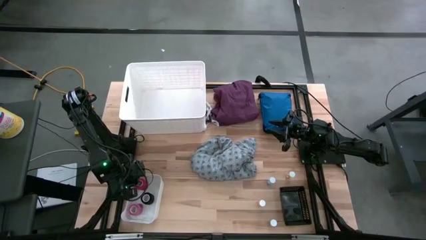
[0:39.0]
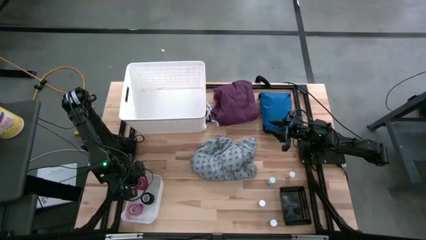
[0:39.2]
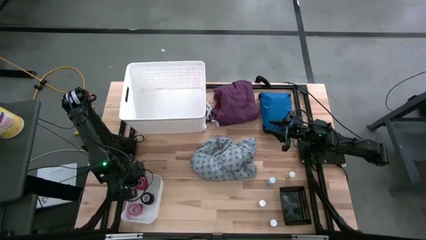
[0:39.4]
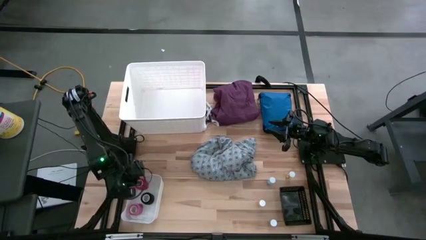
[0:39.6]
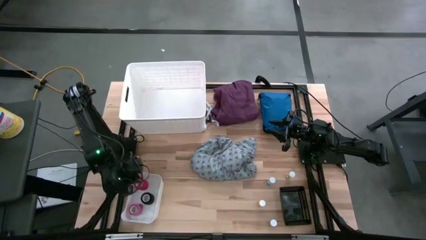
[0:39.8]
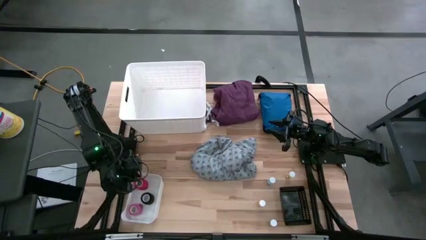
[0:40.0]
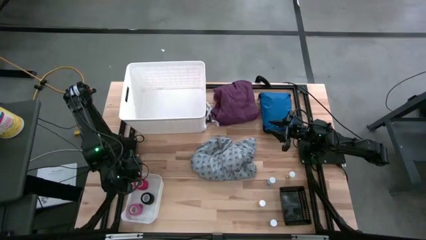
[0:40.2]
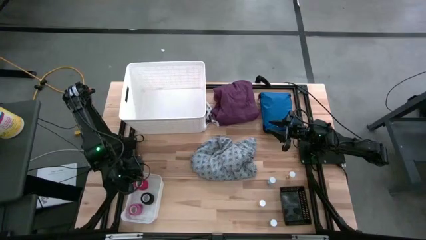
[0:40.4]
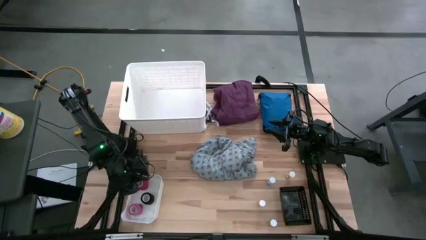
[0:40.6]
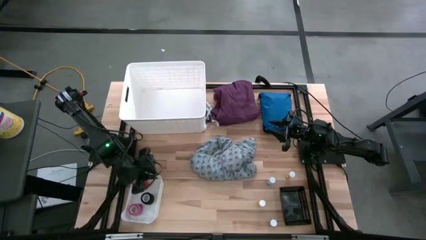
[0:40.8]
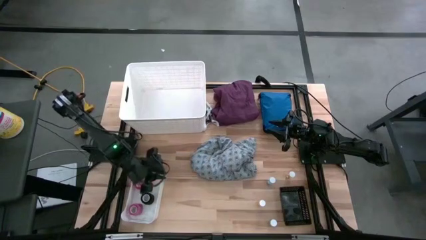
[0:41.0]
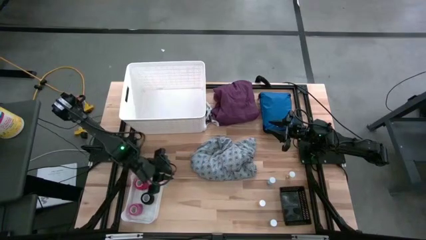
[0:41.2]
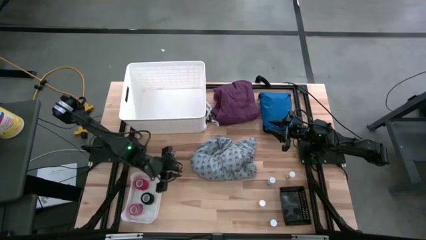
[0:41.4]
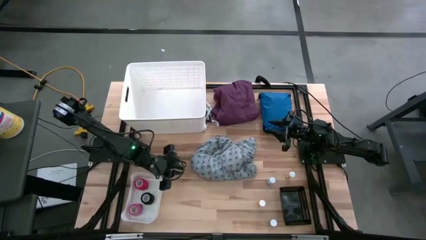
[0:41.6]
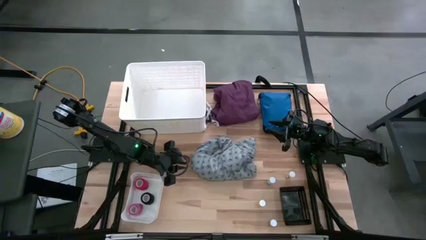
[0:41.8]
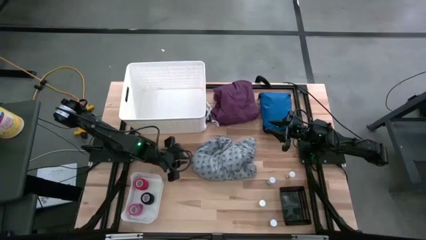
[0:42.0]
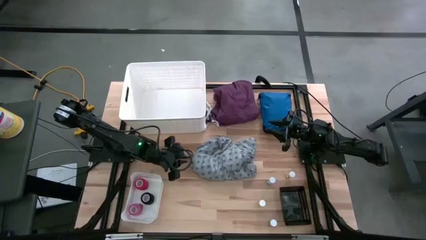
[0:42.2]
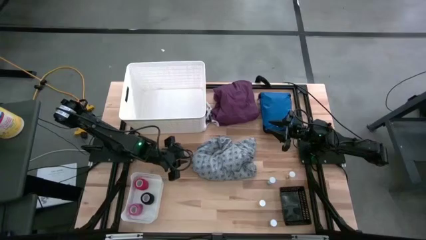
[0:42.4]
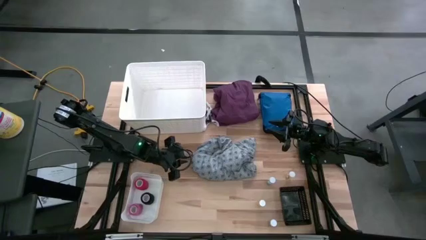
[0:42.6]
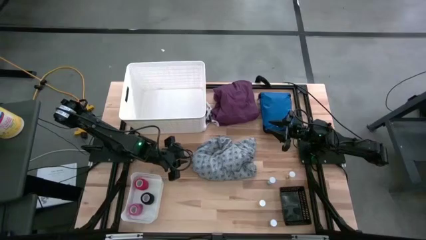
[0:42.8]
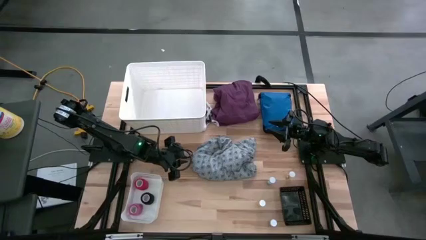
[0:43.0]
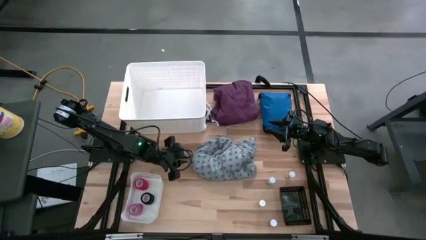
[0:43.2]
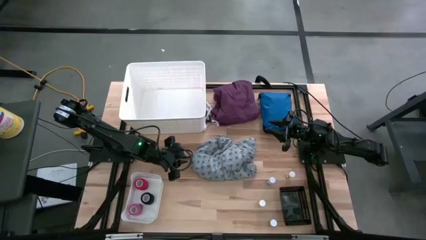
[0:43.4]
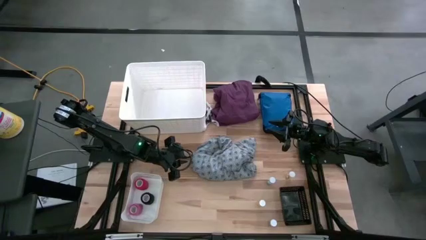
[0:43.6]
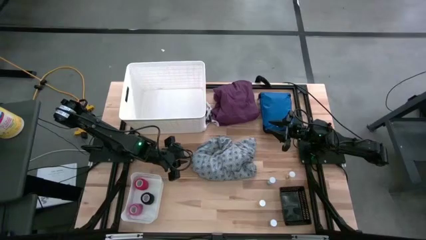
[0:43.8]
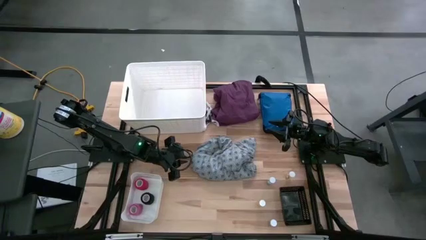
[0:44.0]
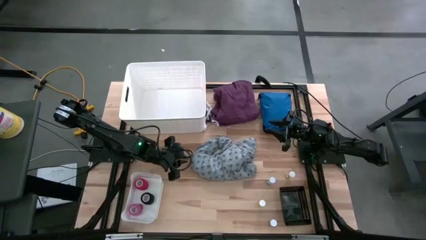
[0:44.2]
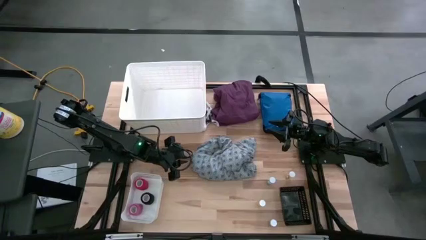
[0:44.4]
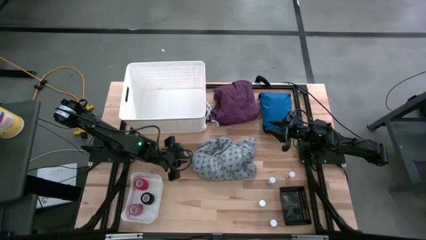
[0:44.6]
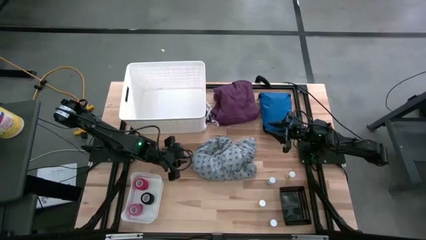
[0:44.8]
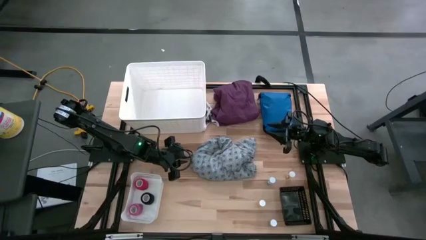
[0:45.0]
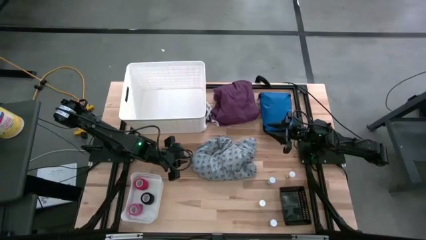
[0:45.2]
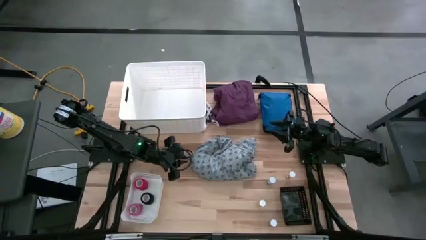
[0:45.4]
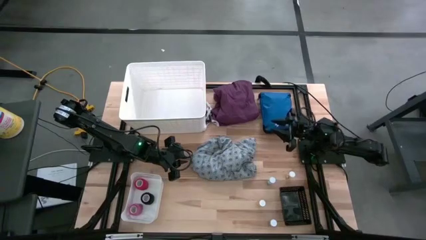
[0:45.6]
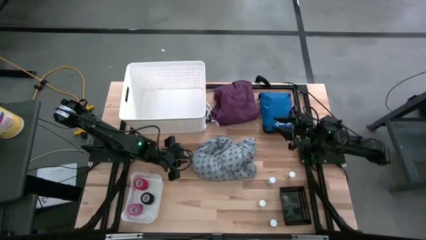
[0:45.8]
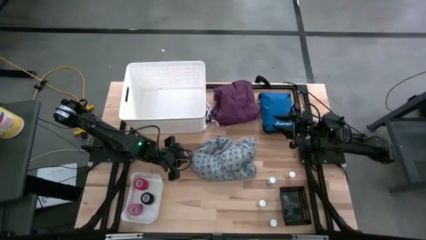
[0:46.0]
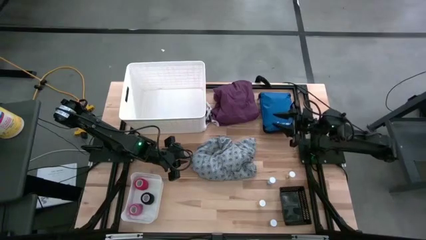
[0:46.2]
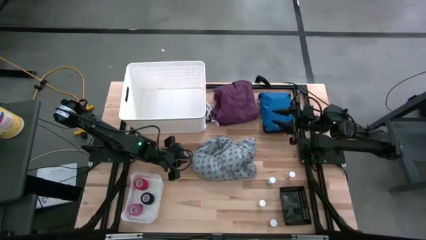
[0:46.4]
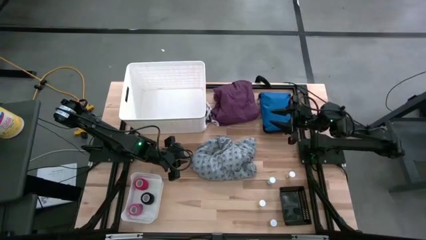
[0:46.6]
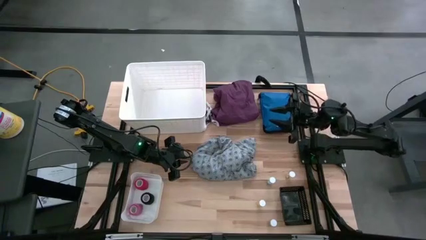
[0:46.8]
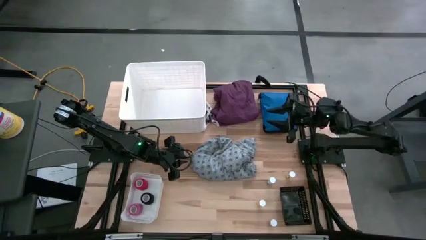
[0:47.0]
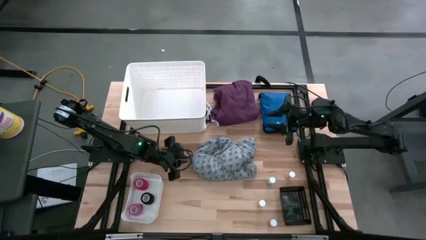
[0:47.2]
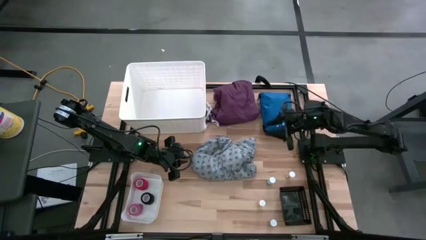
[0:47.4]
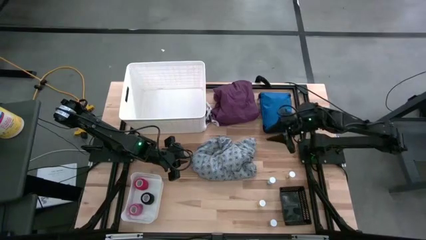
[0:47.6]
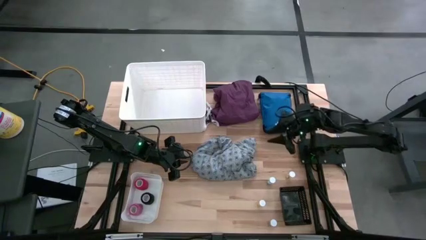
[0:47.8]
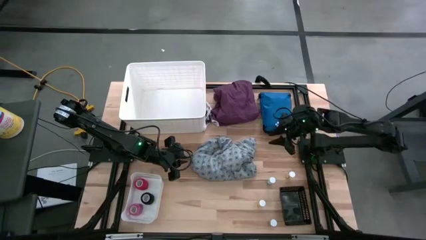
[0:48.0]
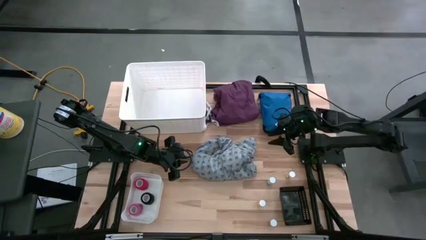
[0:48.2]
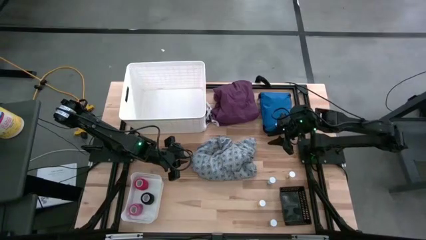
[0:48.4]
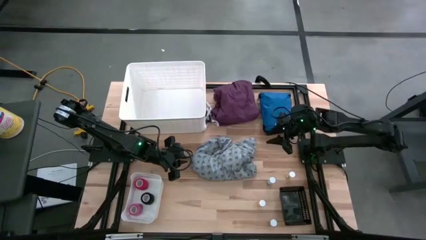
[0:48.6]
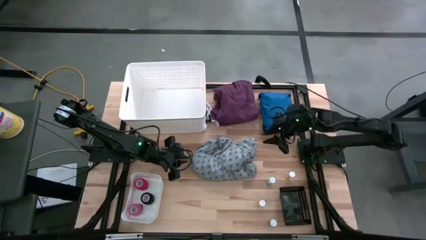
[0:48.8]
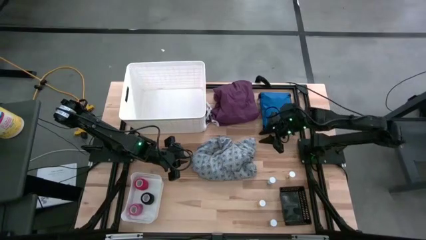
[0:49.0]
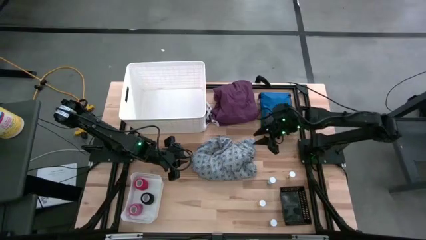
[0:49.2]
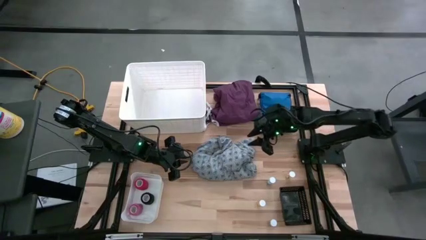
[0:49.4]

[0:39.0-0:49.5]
Task: Pick & place medical supplies in basket/bin
Put the top blue pill bottle into the black bin
